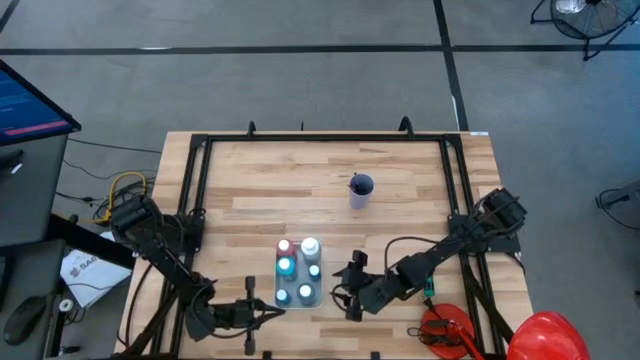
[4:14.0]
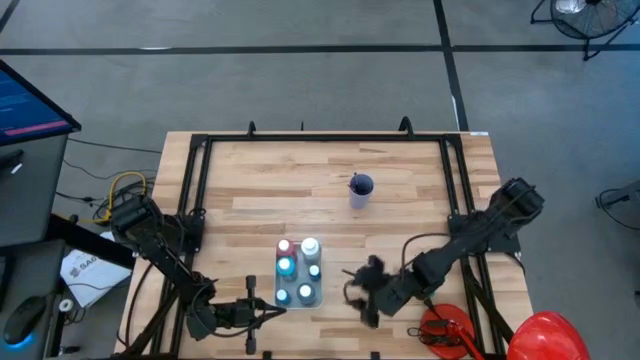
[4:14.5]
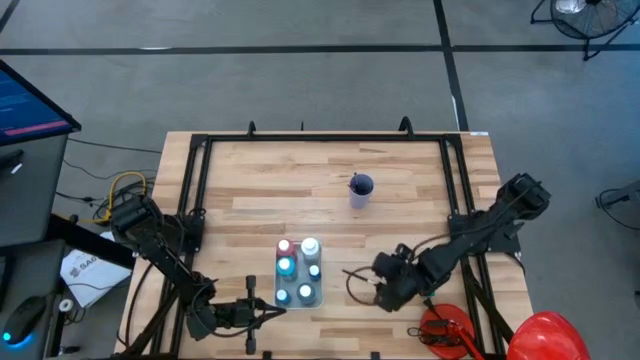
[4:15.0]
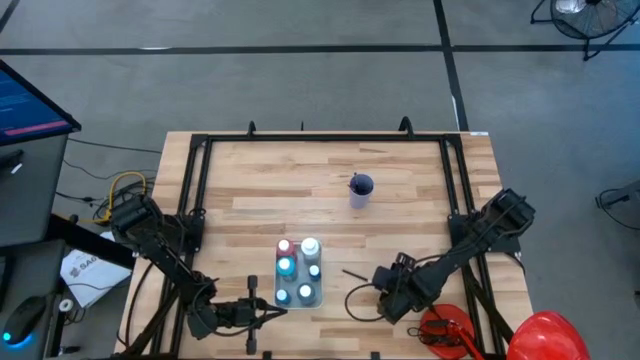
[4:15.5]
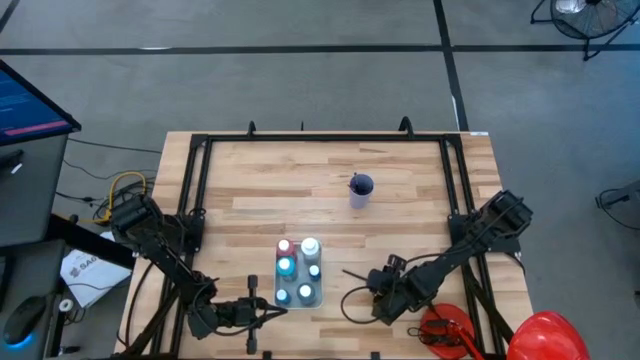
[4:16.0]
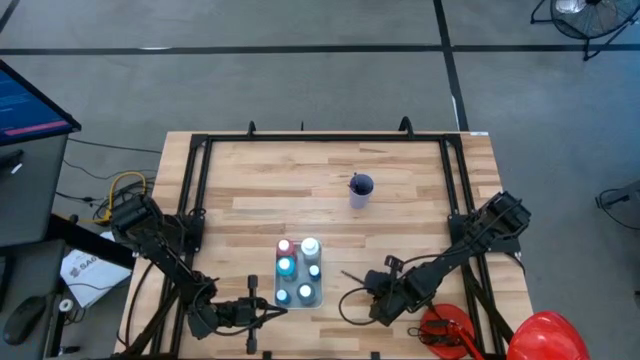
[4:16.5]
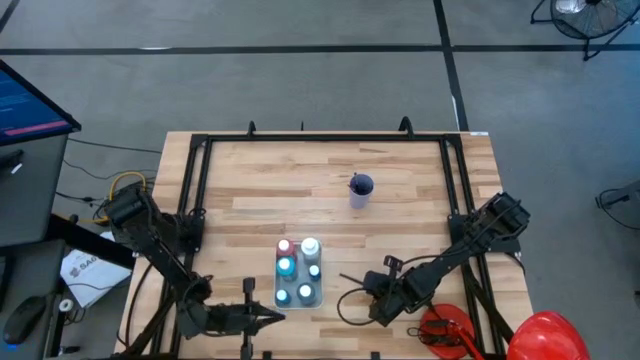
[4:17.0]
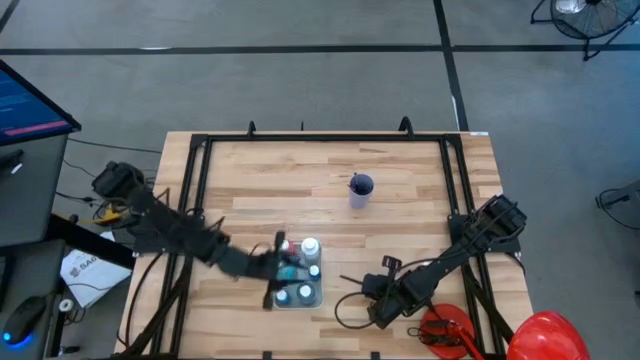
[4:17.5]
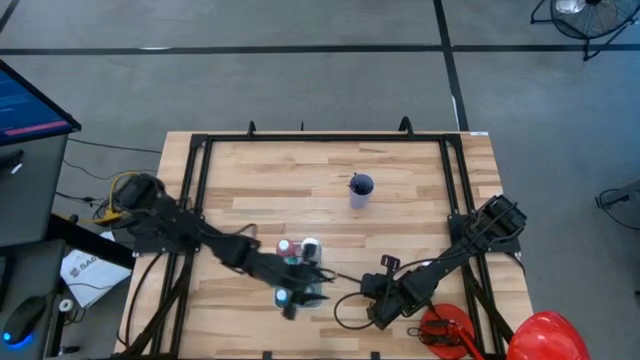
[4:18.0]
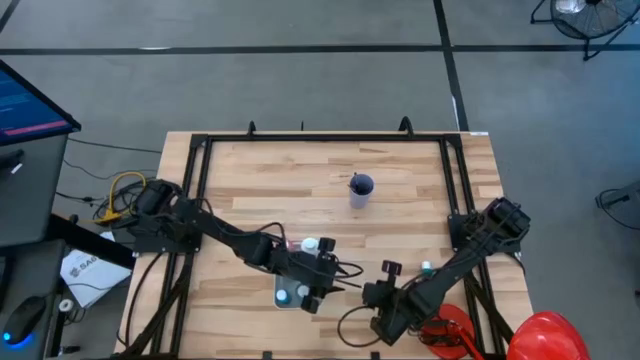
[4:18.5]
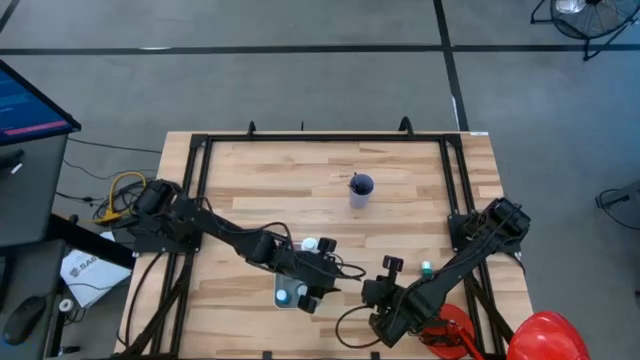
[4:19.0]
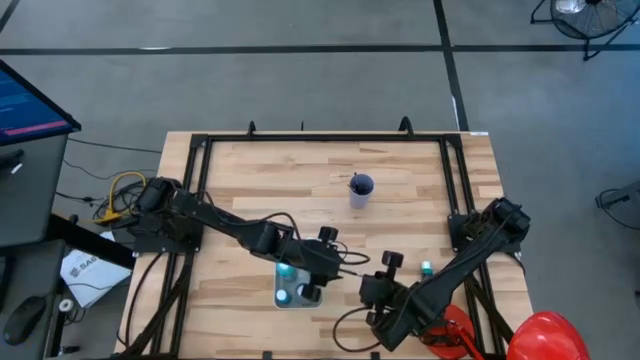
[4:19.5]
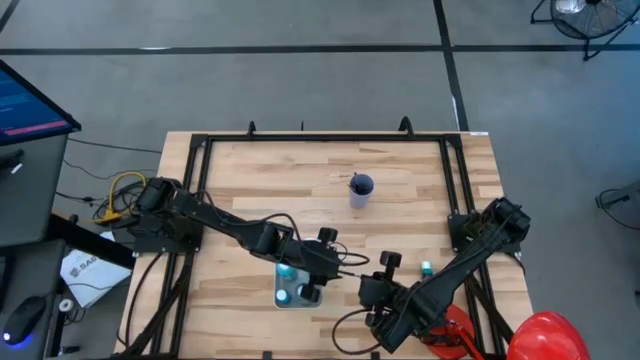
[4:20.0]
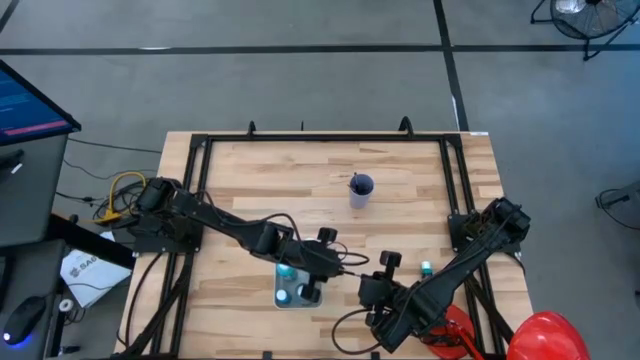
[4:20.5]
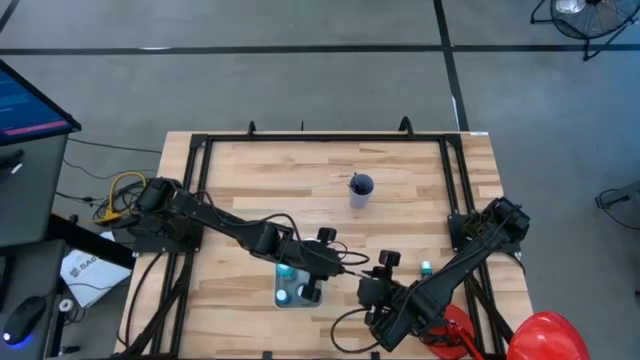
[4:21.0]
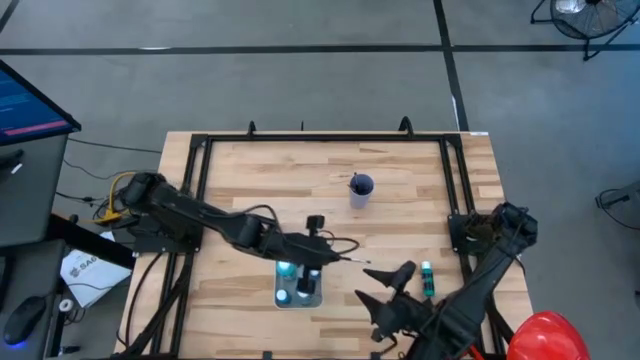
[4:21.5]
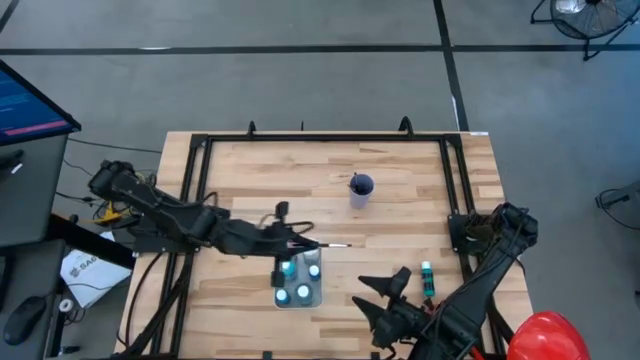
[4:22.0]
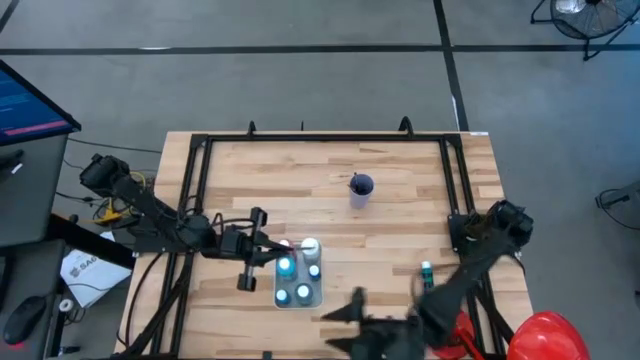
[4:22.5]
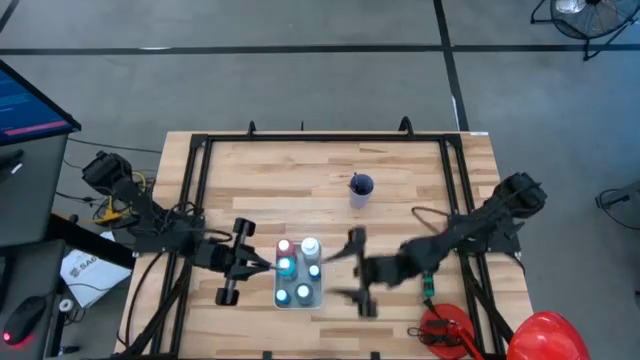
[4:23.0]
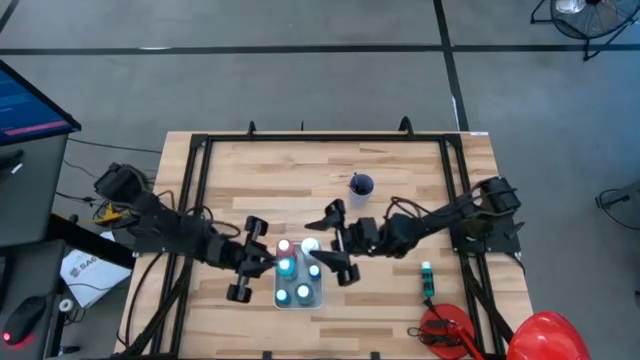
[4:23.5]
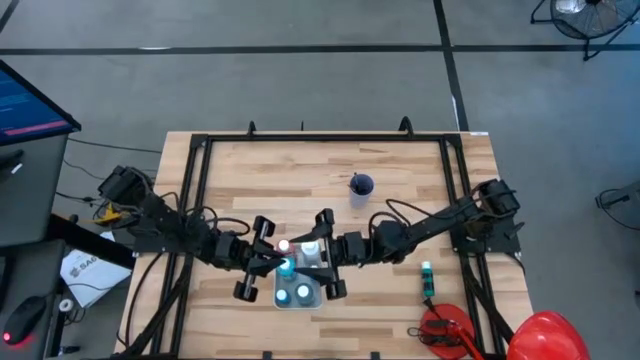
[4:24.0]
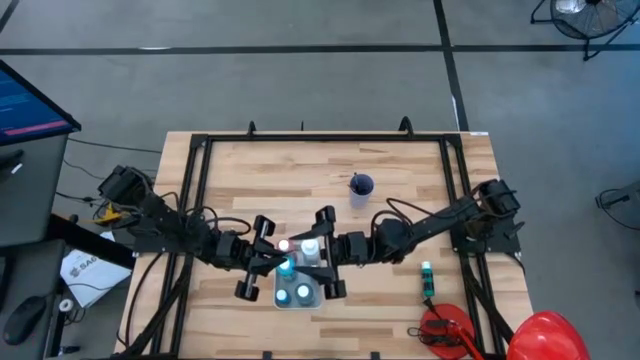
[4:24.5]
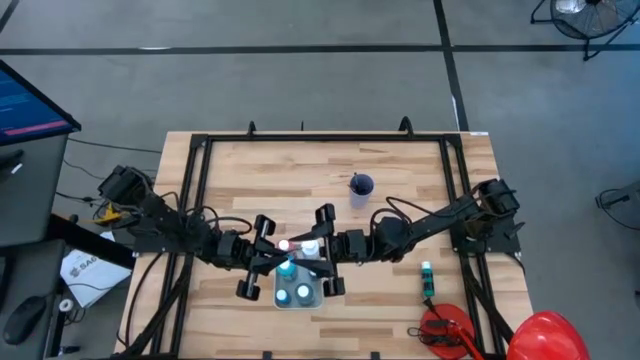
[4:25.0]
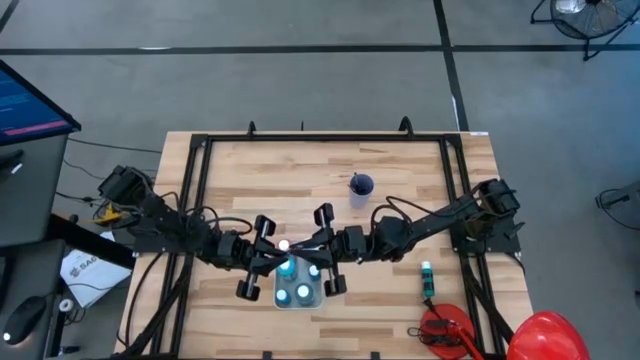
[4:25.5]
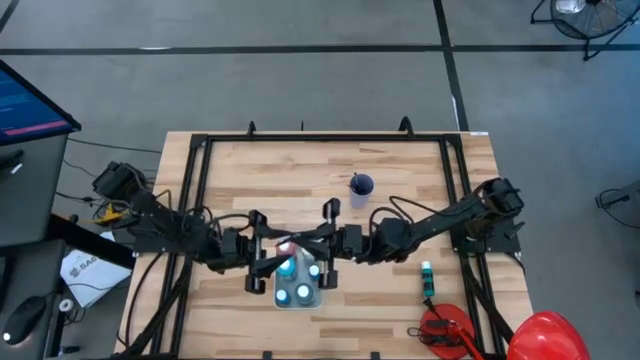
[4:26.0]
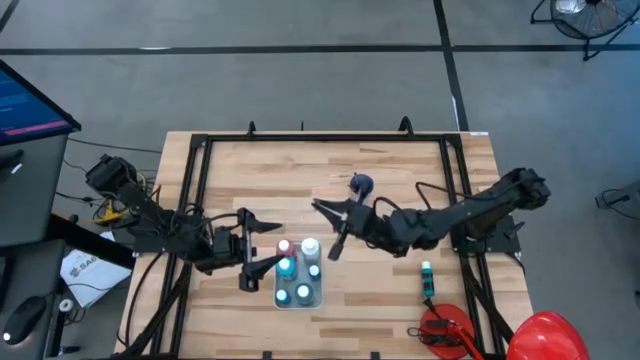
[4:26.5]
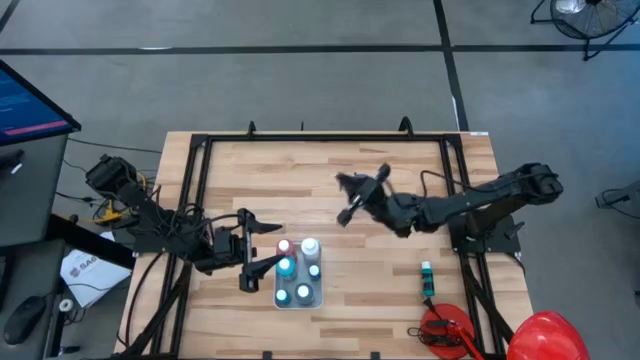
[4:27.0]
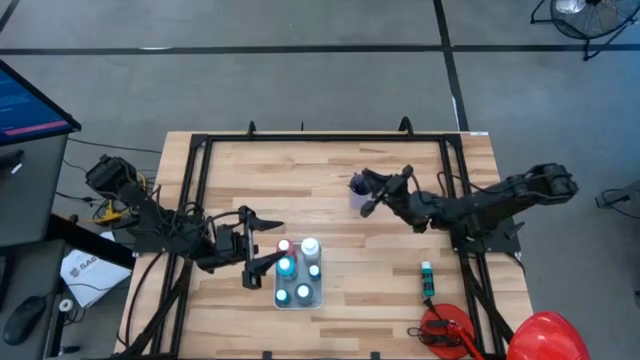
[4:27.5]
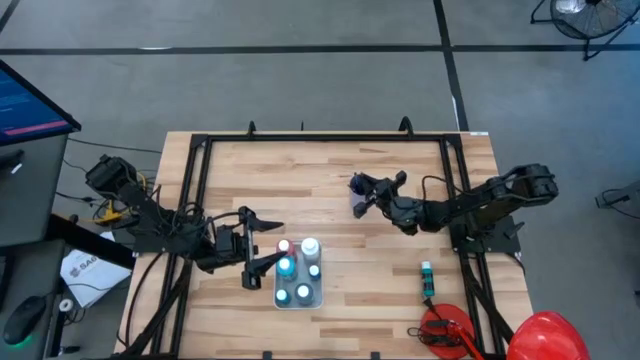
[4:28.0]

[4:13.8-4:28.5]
Task: Pick & Place Paint Supplies
Put the silver paint brush into the violet cup

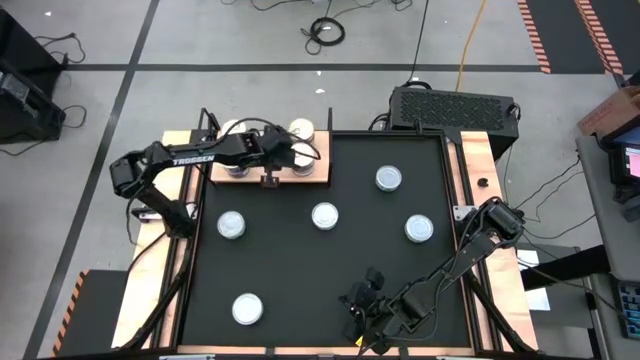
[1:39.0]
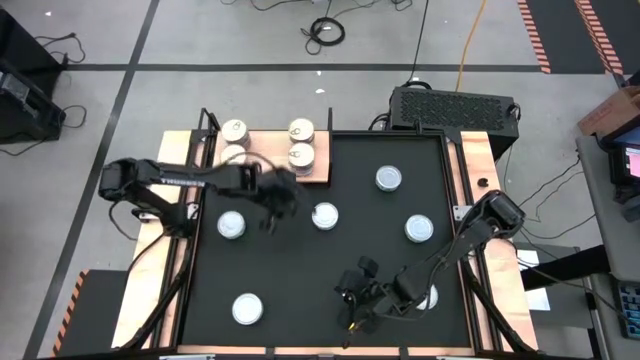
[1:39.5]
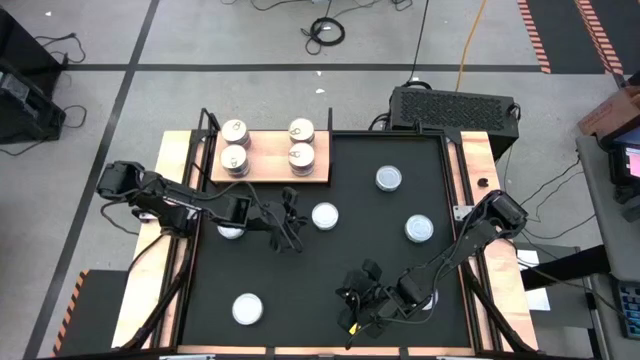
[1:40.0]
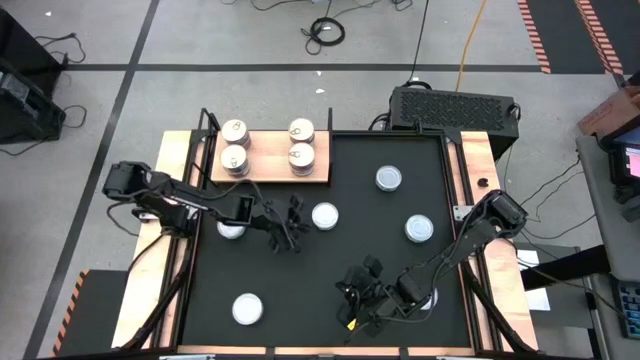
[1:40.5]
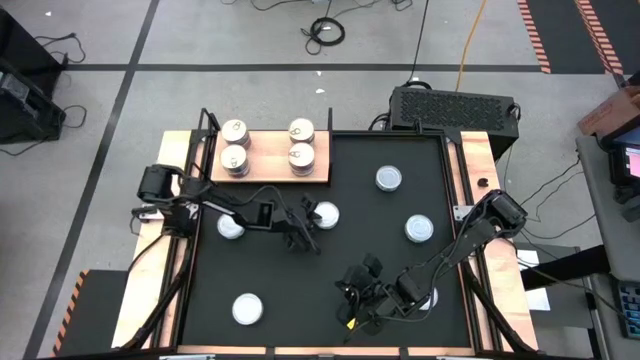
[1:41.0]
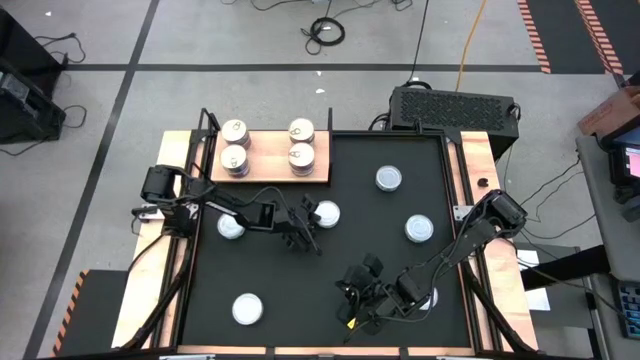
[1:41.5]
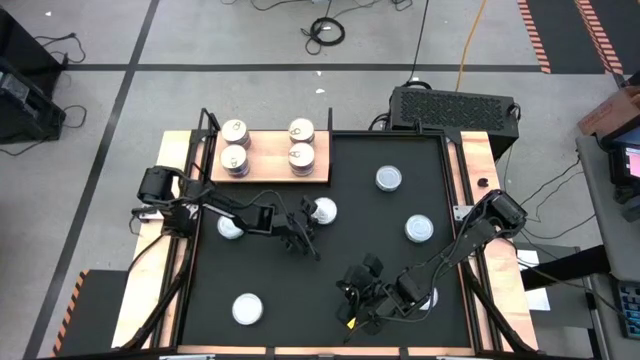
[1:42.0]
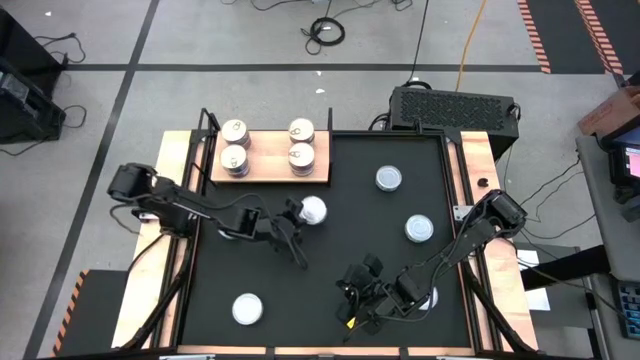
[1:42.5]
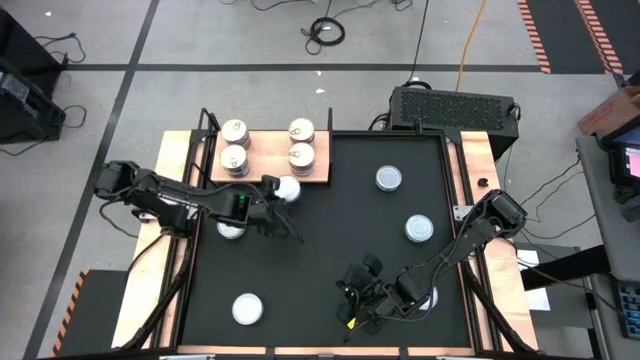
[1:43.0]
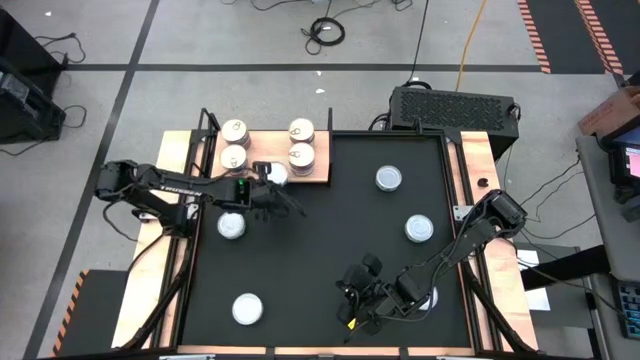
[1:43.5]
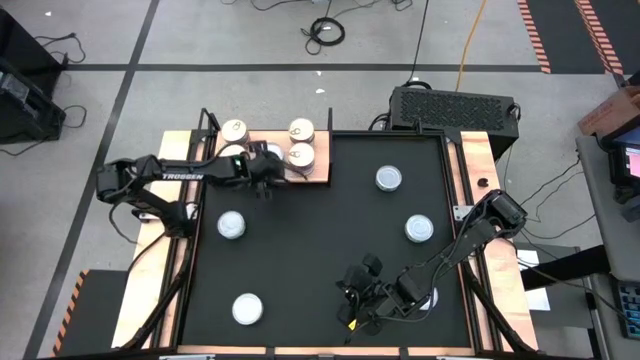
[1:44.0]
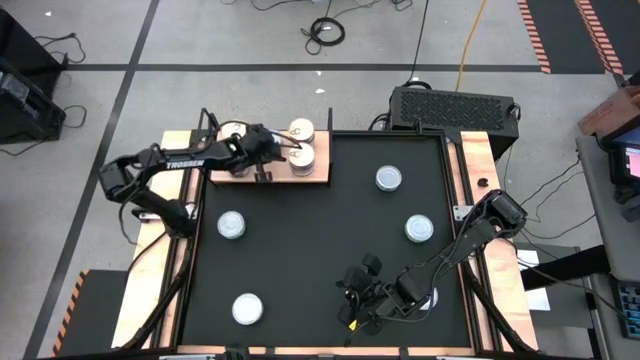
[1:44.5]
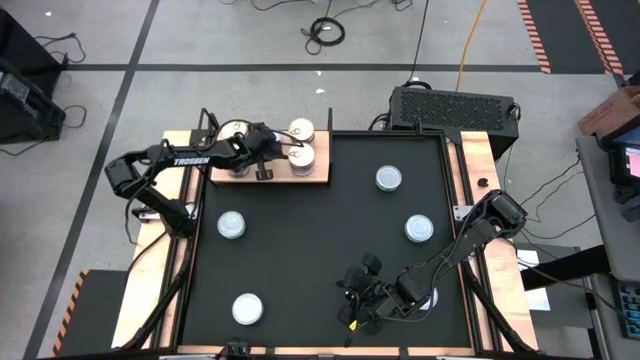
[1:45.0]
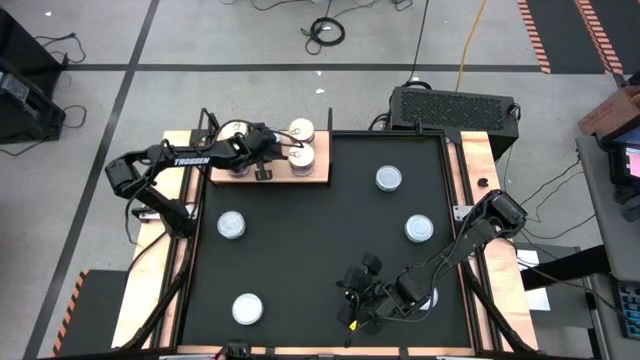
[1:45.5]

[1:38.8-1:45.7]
Task: Stack canned seafood by type on shelf
Put the green tuna can on the shelf
